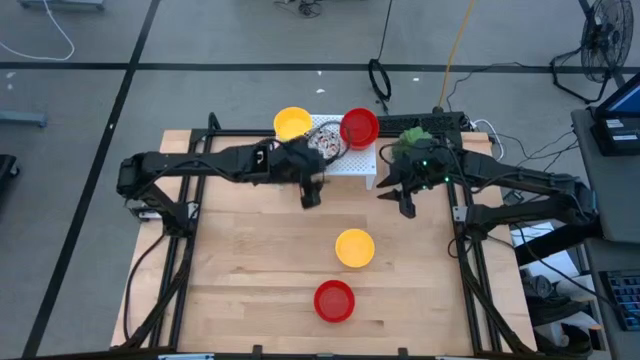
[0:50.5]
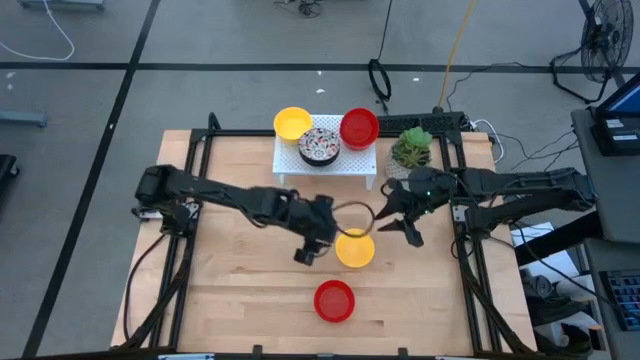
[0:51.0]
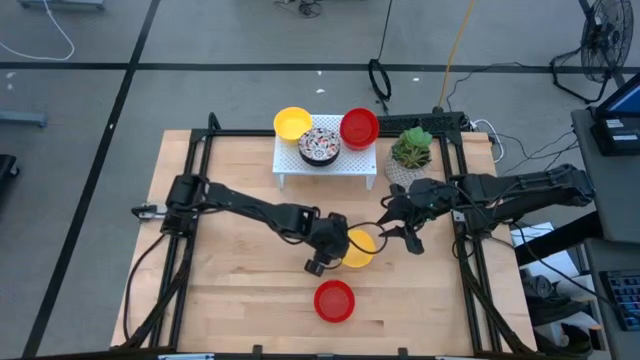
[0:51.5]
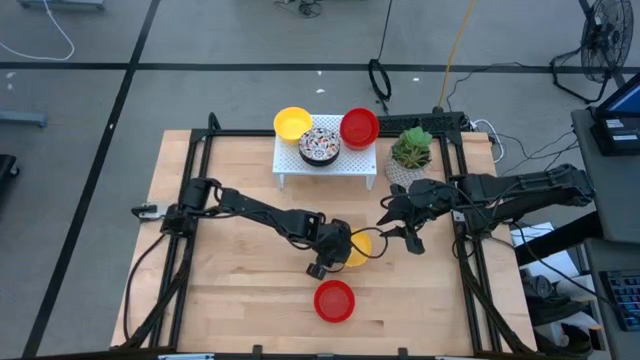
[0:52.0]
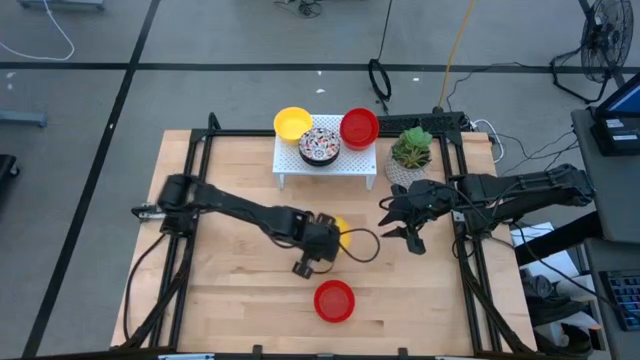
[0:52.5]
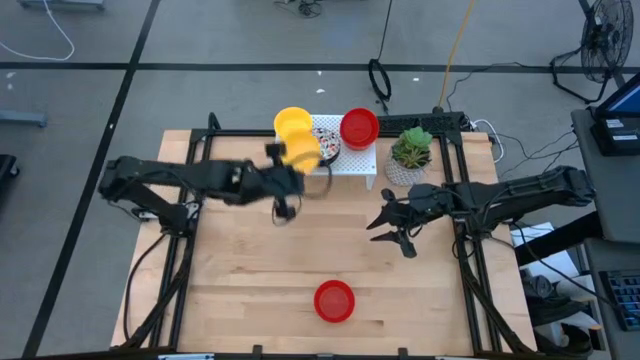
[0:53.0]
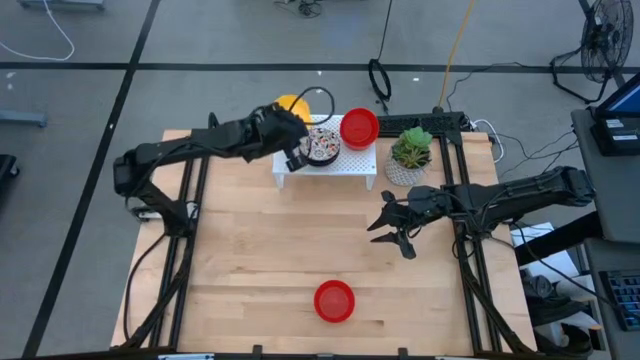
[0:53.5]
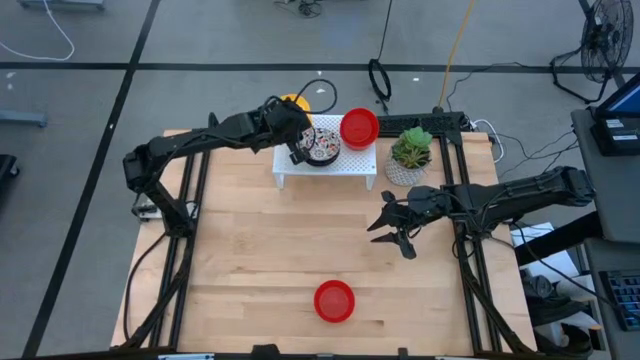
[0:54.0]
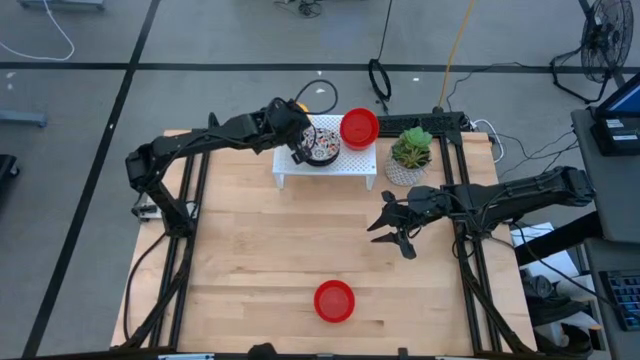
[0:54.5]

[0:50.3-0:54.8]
Task: Pick & Place Mini bowls
Stack the yellow bowl on the yellow bowl on the shelf

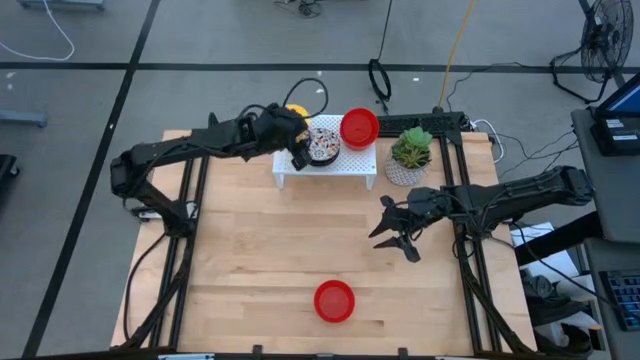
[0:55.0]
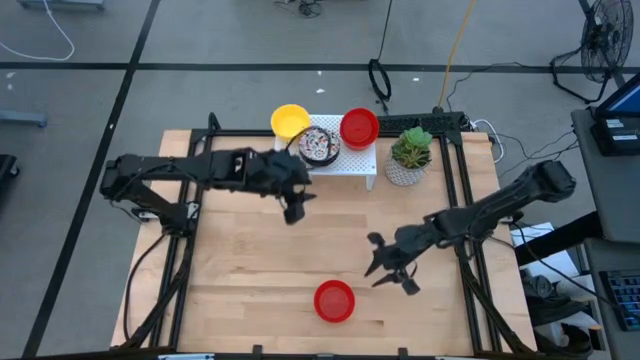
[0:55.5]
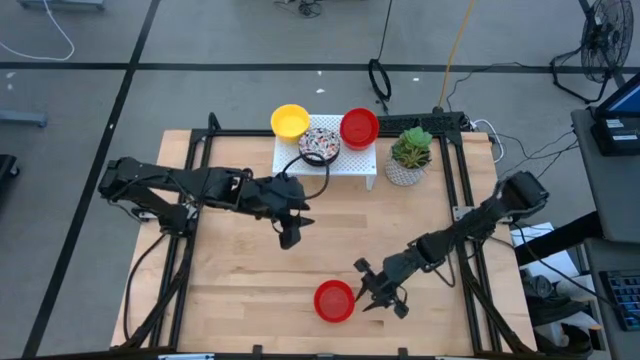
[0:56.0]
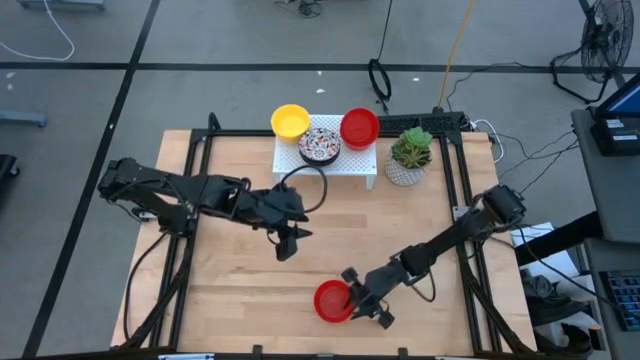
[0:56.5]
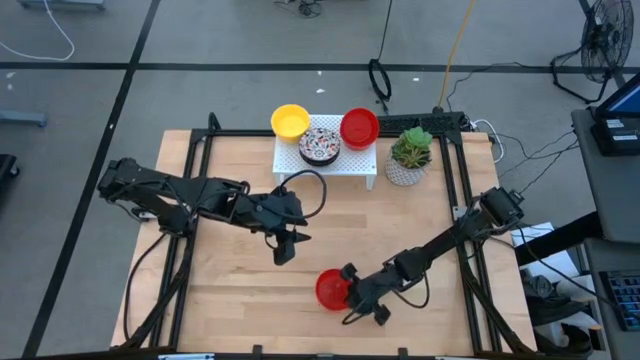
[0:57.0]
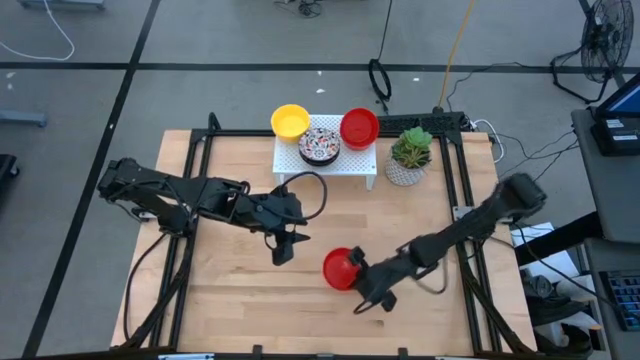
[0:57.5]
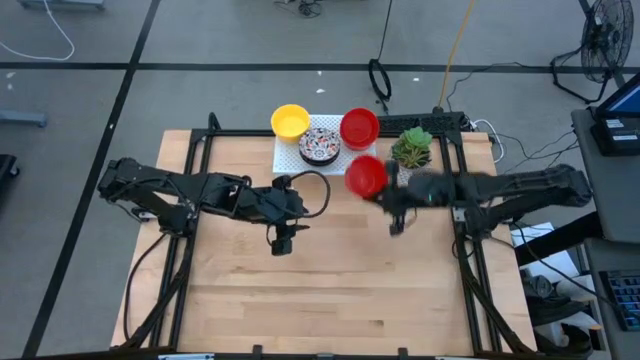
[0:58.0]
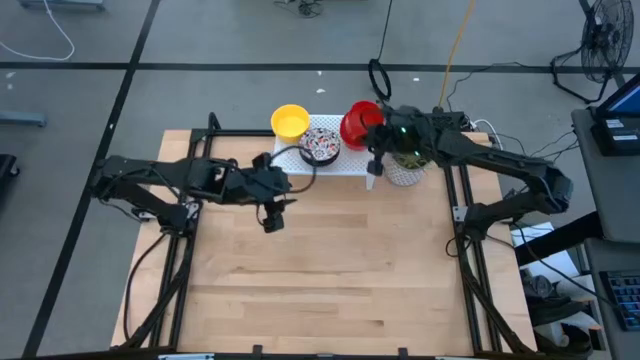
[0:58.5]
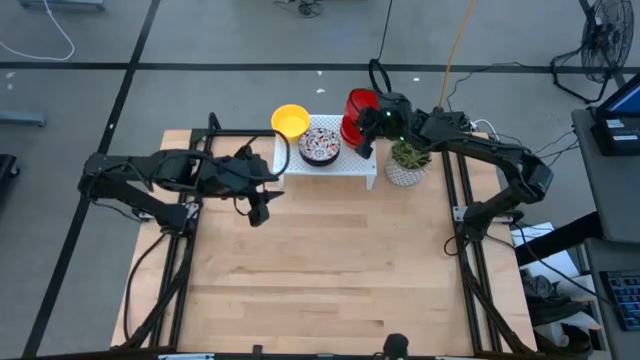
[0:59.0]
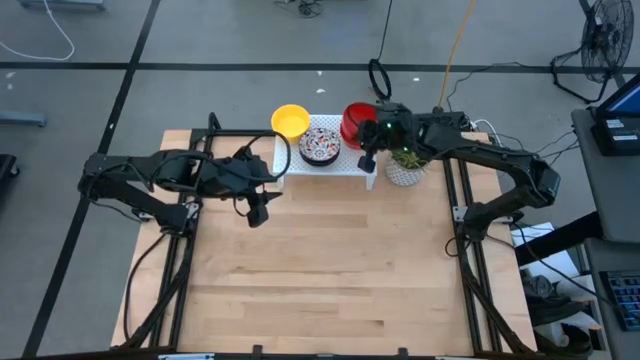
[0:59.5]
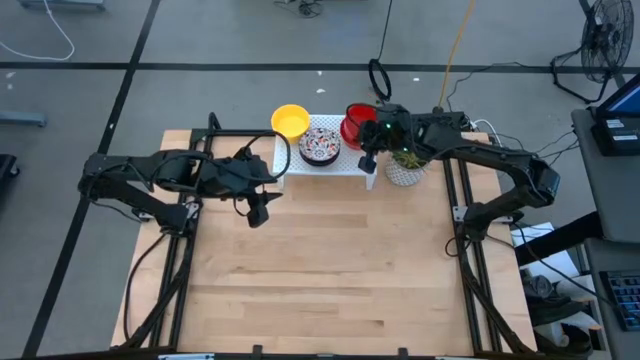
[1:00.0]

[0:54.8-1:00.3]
Stack the red bowl on the red bowl on the shelf

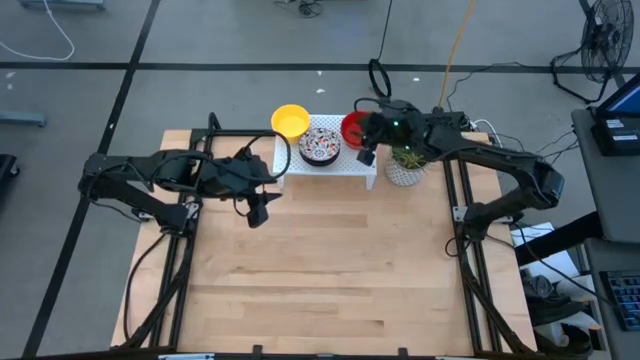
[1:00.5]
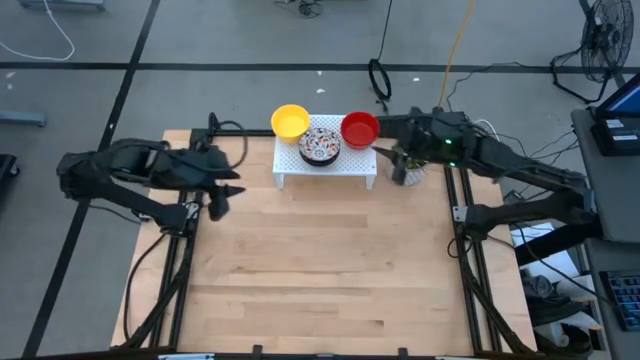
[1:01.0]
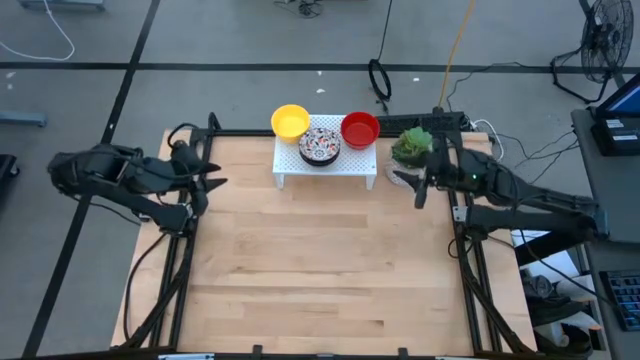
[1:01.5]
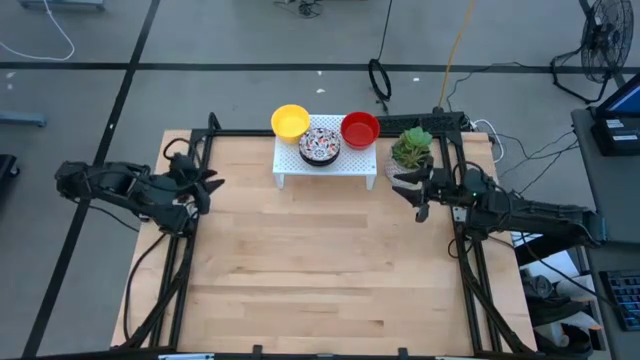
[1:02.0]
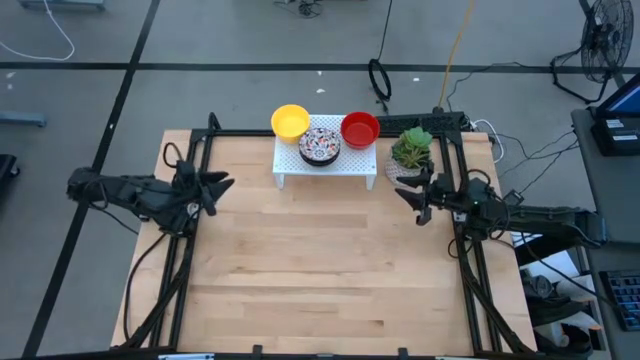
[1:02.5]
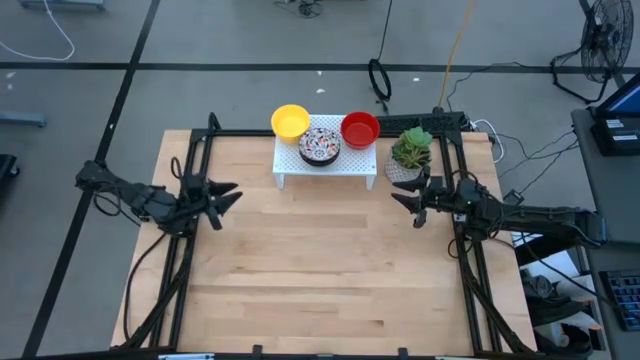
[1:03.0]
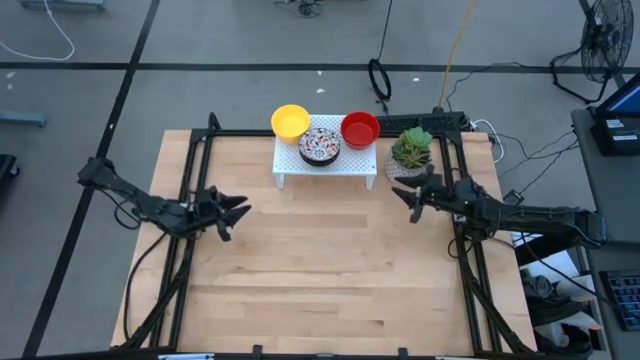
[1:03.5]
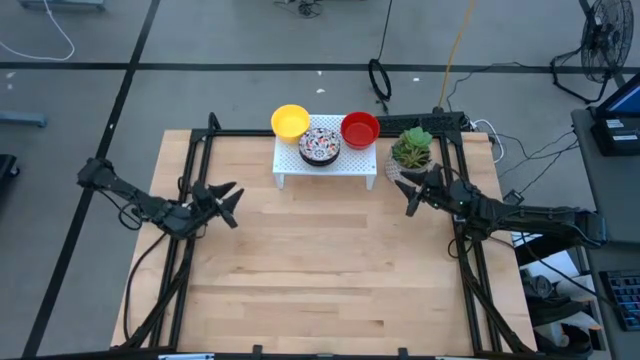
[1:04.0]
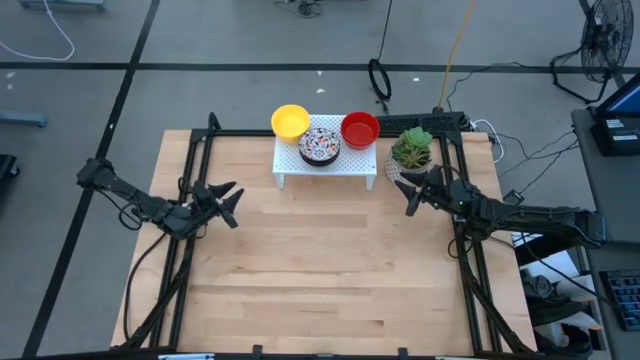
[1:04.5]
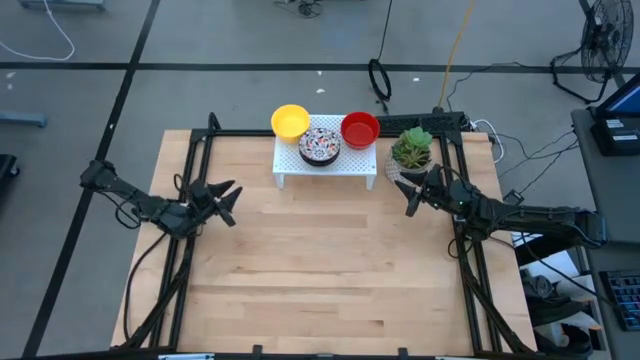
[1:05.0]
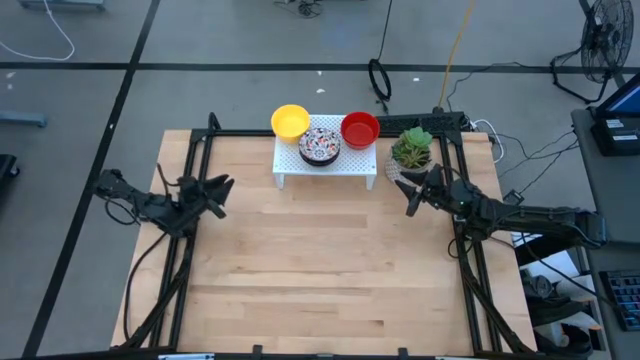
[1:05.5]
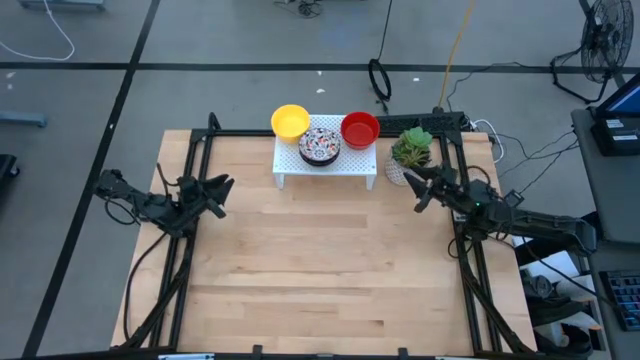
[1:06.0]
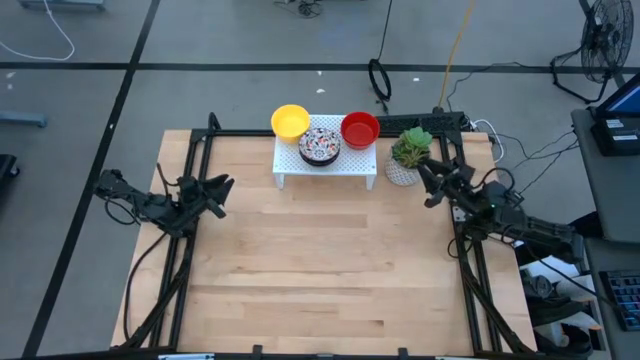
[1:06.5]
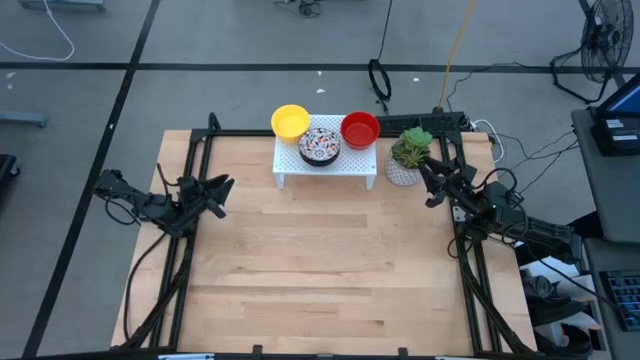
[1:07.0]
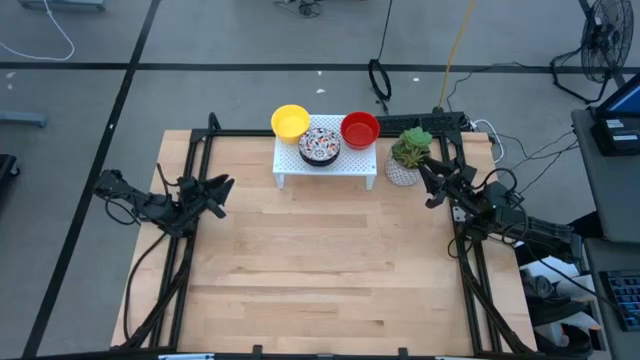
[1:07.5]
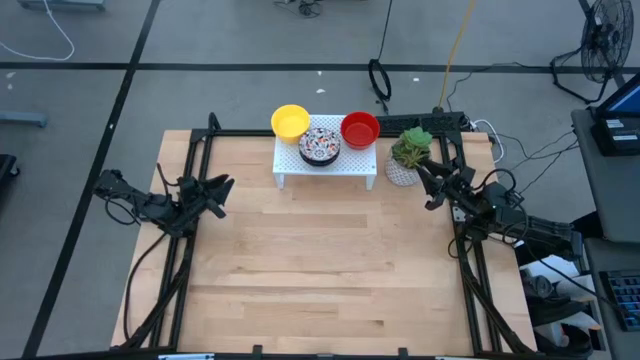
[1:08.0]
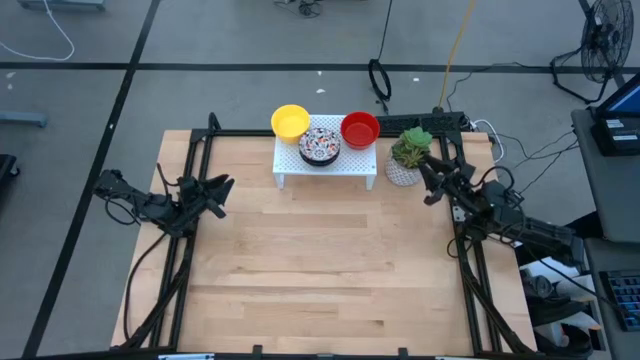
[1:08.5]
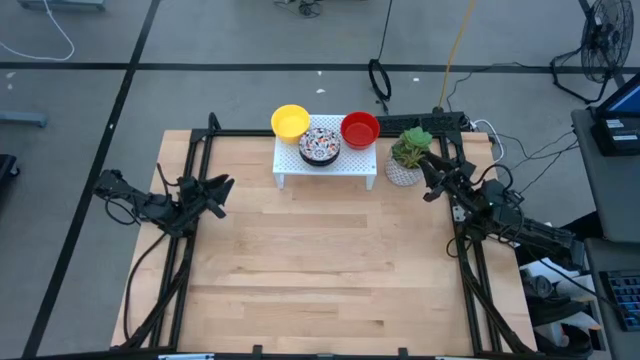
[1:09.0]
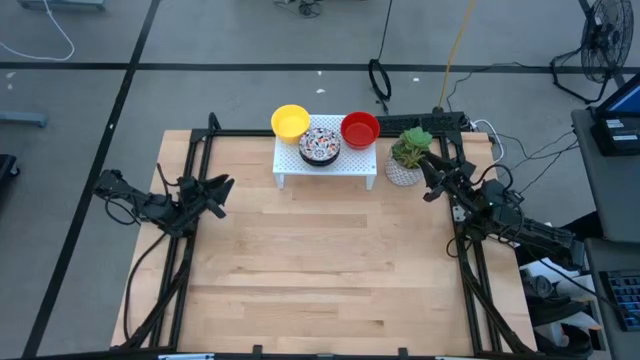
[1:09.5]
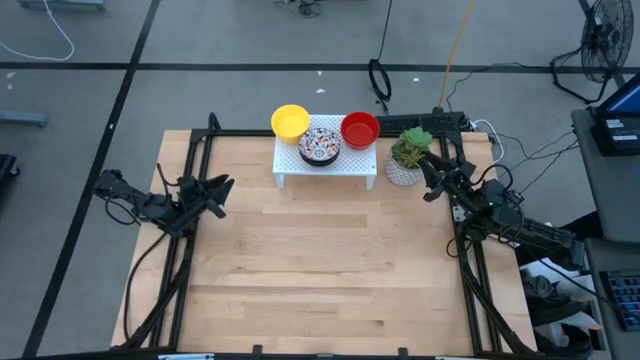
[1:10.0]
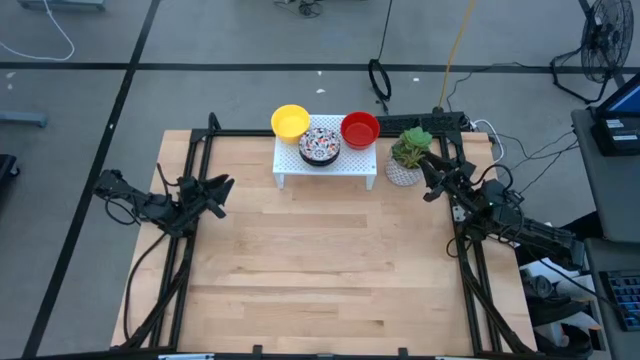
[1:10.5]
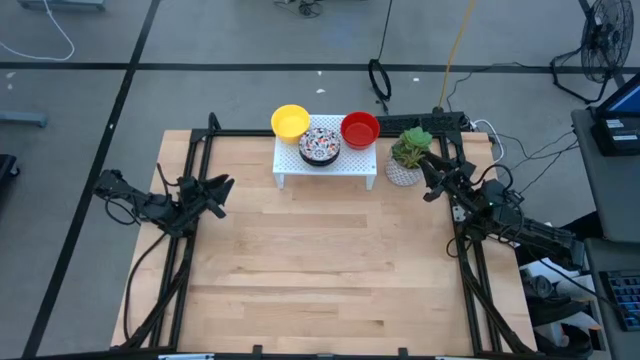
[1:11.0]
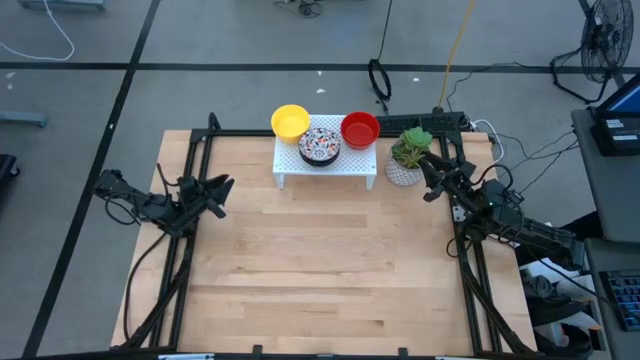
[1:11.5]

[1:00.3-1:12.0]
Return to Home Position

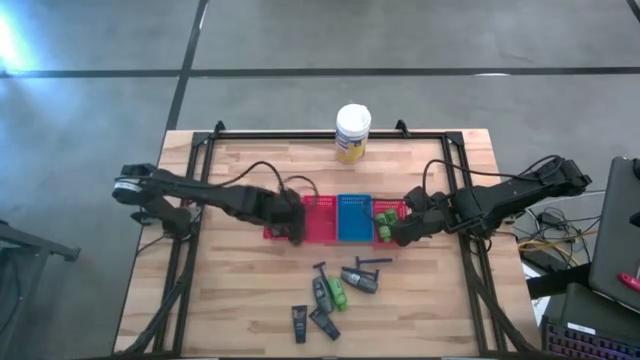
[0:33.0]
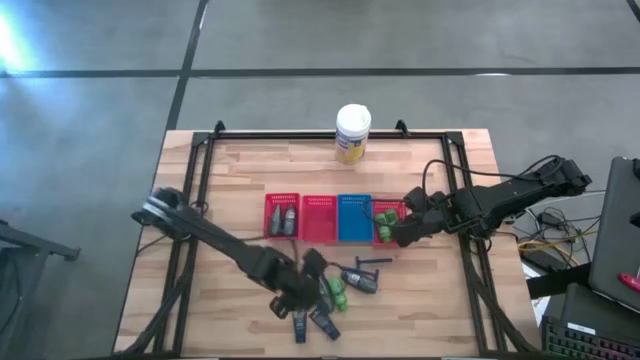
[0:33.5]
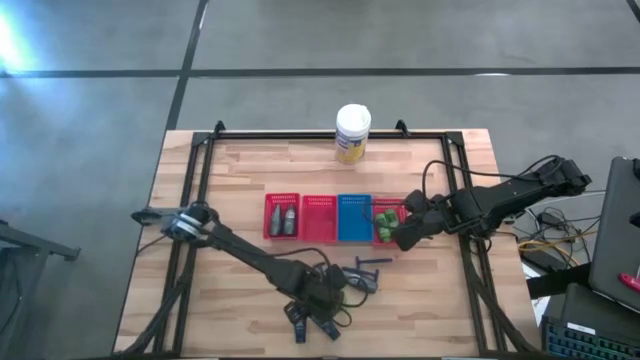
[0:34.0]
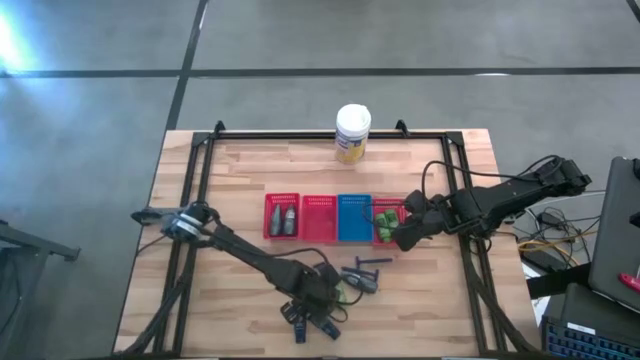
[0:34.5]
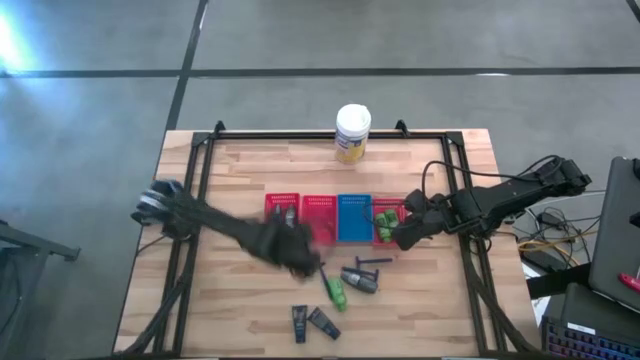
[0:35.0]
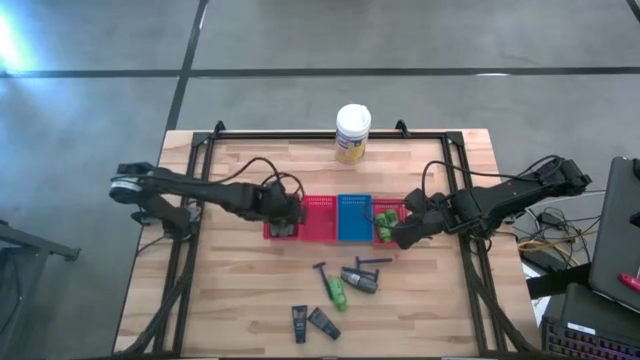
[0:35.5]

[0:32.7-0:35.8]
Task: Pick & Place Travel size toiletries
Put the gray deodorant into the left red bin
